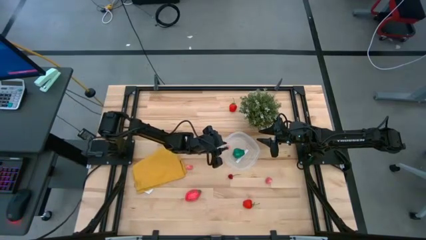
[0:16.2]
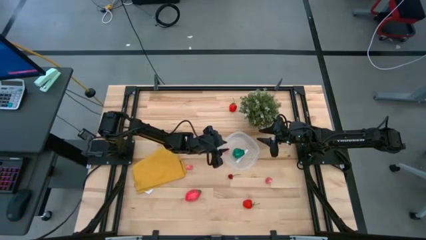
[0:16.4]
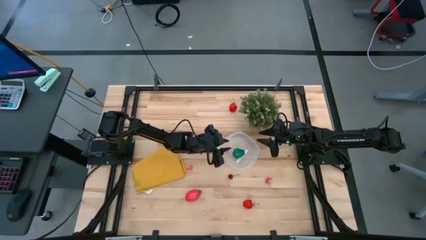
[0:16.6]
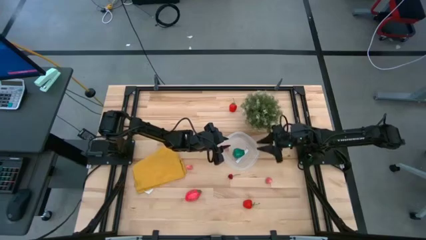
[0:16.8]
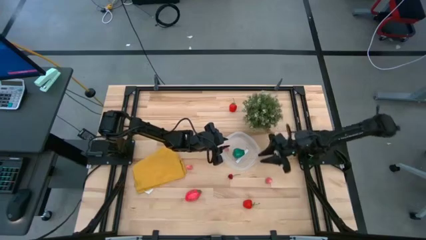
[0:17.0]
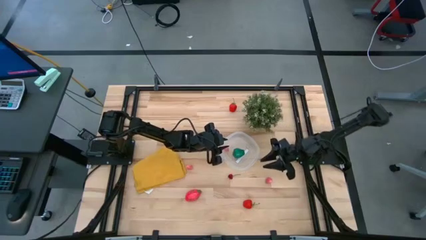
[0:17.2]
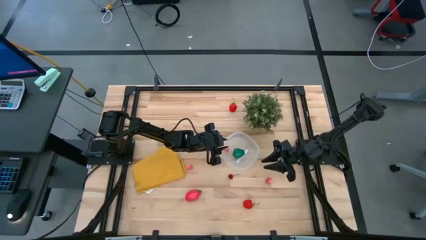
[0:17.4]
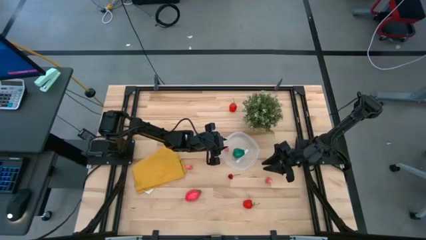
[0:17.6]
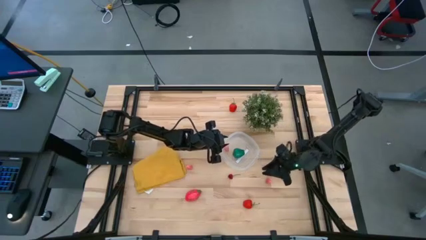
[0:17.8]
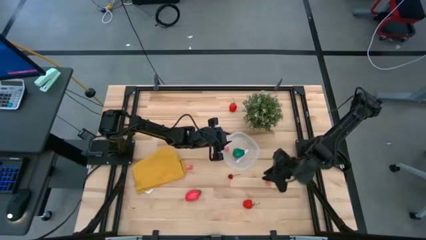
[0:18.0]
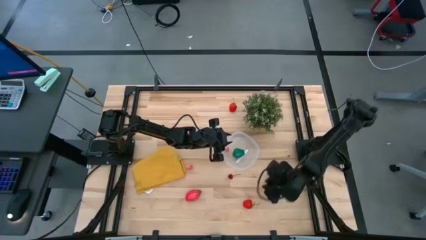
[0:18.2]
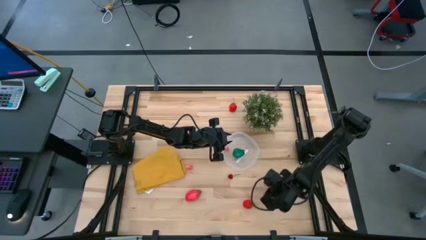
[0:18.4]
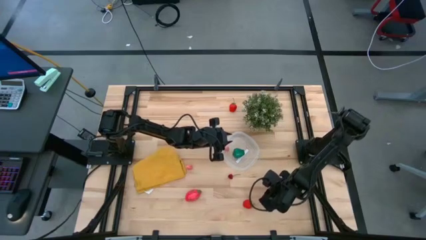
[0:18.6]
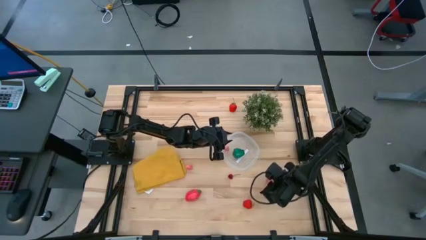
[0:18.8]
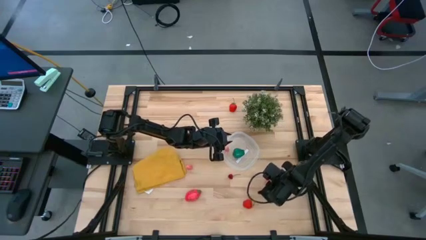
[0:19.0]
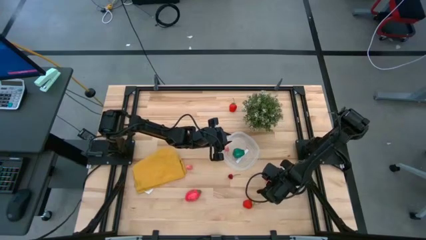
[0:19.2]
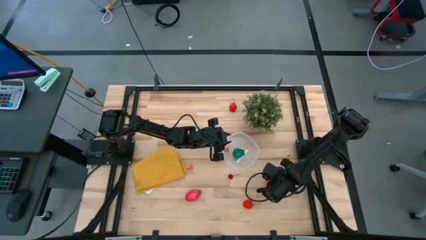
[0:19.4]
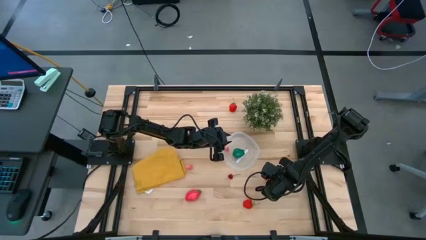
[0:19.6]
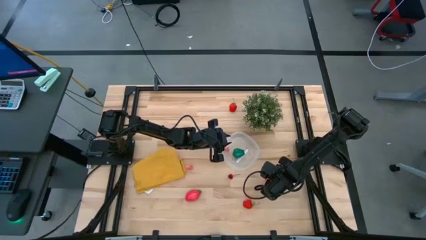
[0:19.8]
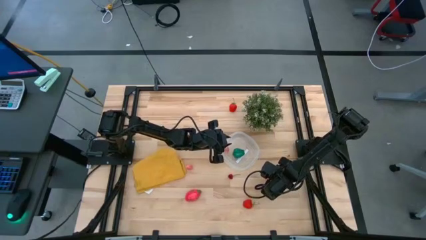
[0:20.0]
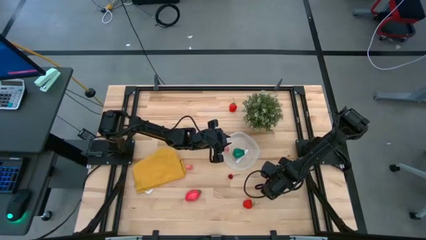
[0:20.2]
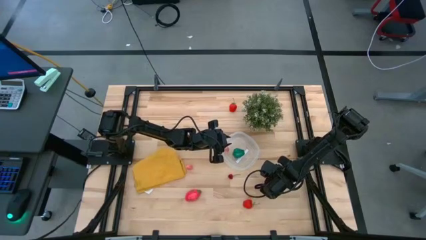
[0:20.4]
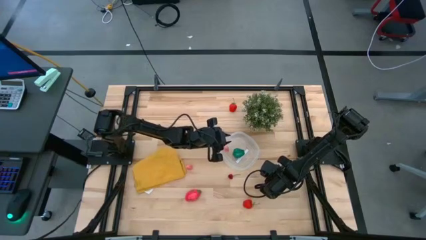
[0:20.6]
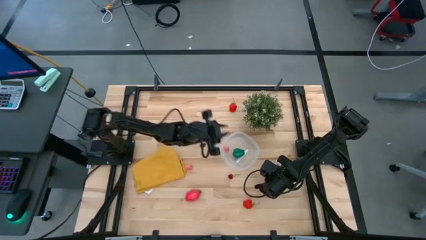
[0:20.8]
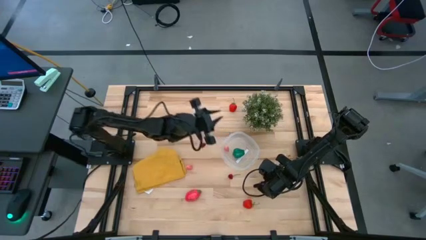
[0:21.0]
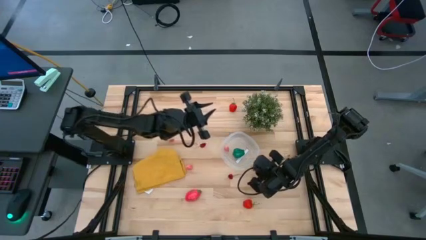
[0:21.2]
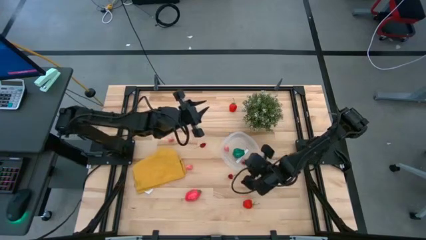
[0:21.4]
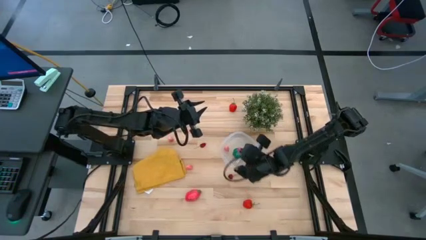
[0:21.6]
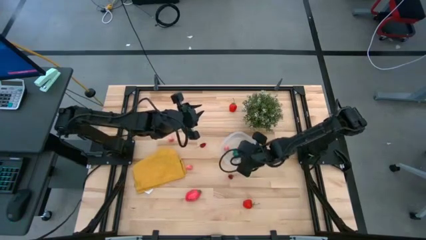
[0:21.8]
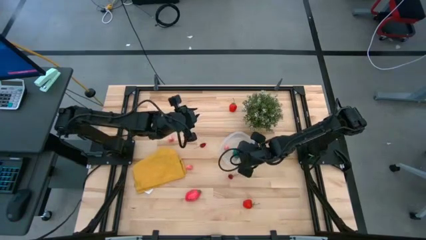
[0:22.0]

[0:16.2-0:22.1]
Task: Pick and placing Produce into tupperware
Put the peach into the transparent bin

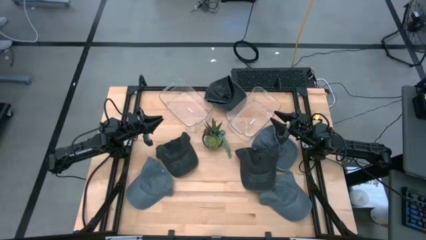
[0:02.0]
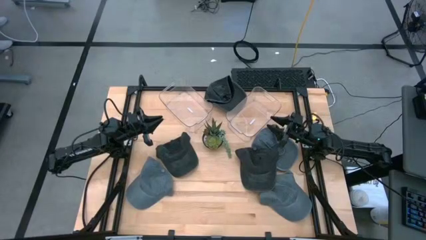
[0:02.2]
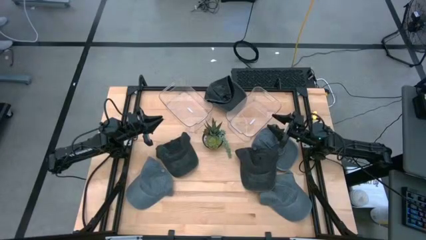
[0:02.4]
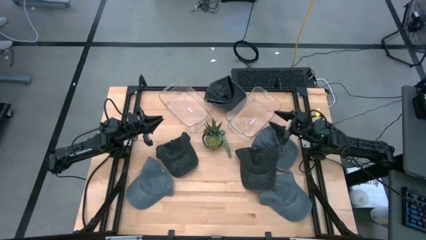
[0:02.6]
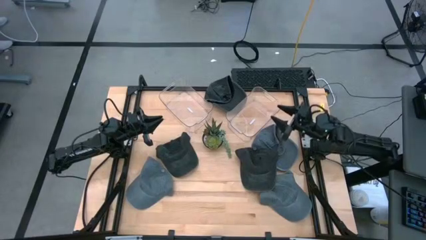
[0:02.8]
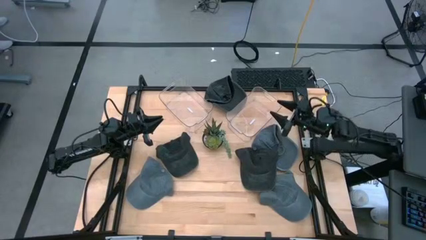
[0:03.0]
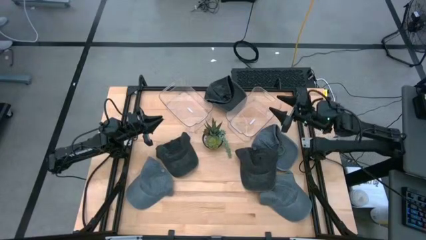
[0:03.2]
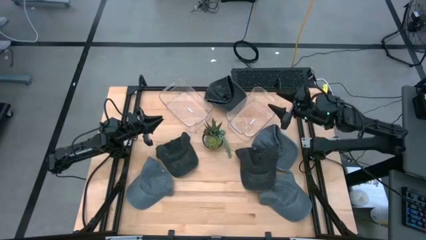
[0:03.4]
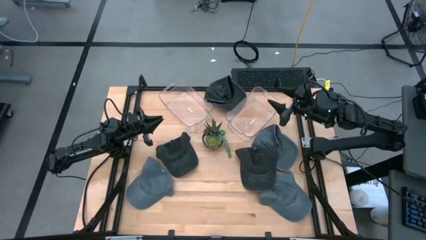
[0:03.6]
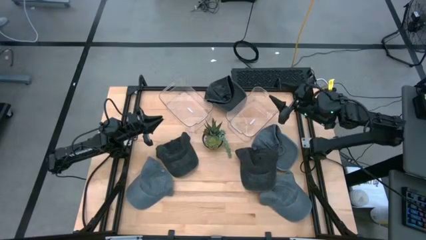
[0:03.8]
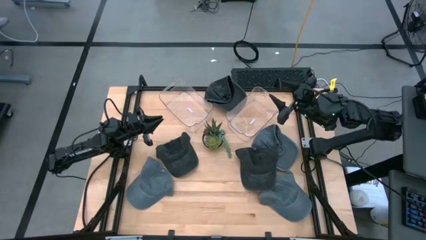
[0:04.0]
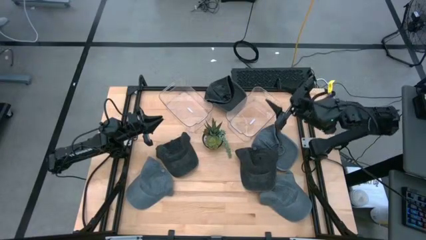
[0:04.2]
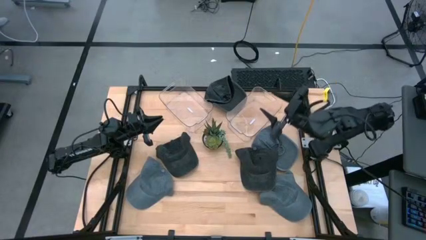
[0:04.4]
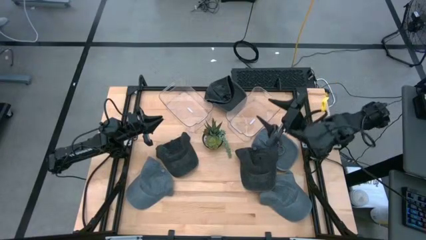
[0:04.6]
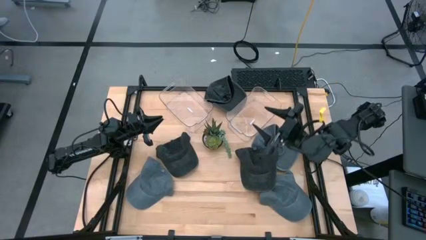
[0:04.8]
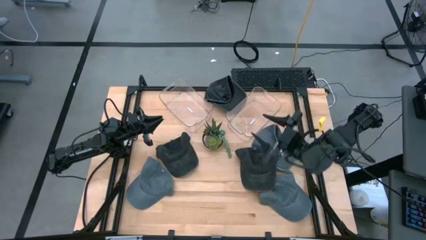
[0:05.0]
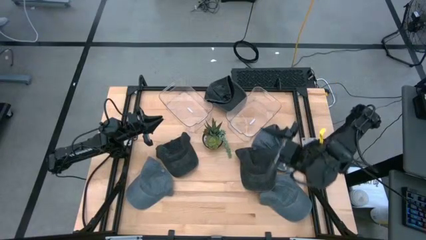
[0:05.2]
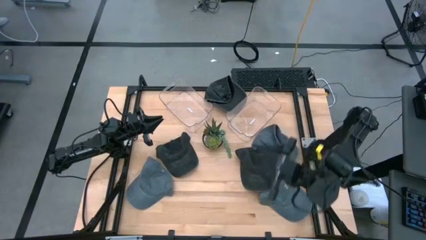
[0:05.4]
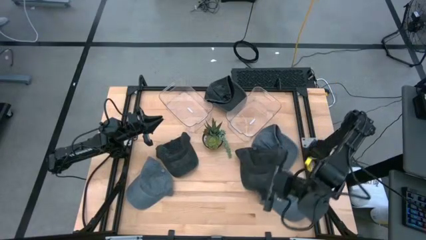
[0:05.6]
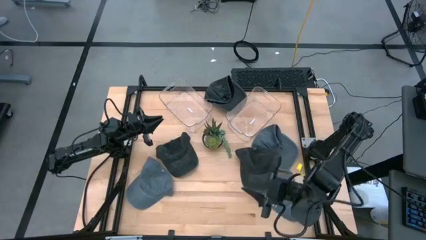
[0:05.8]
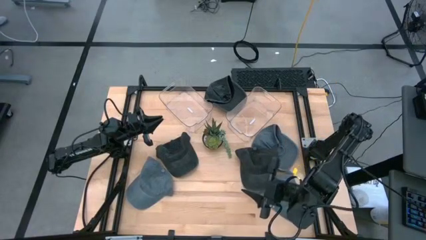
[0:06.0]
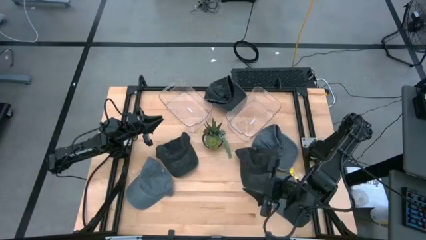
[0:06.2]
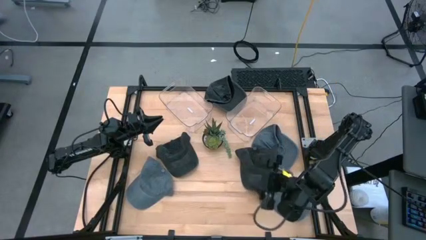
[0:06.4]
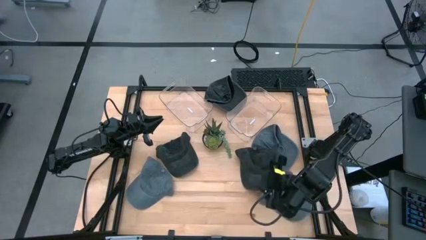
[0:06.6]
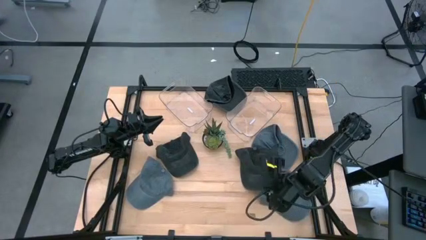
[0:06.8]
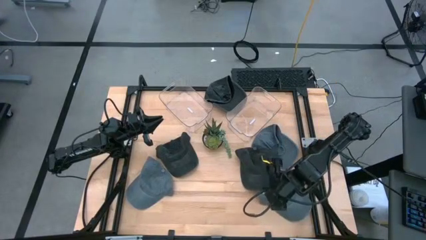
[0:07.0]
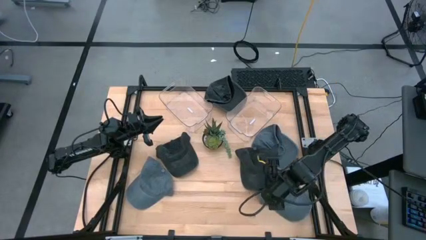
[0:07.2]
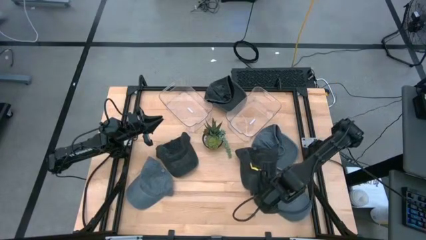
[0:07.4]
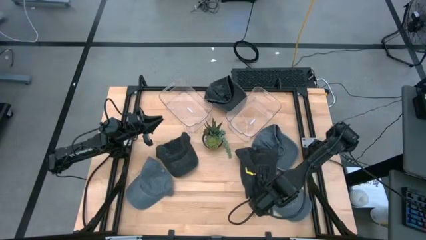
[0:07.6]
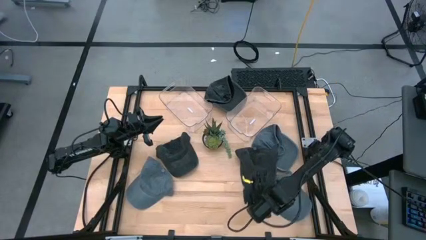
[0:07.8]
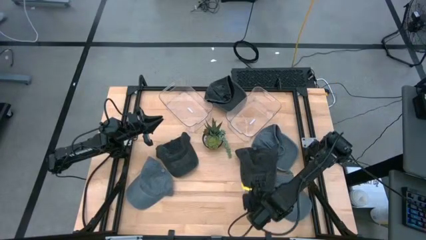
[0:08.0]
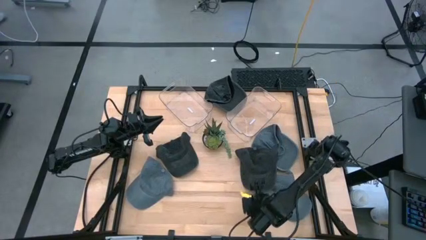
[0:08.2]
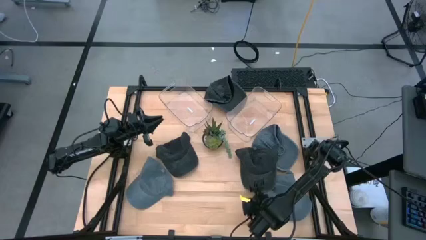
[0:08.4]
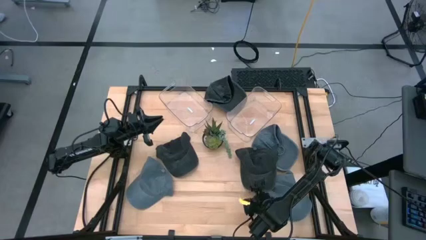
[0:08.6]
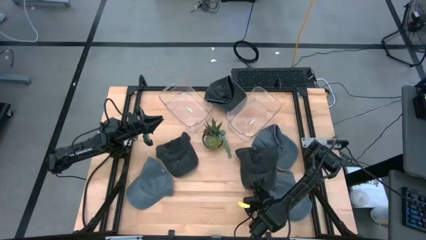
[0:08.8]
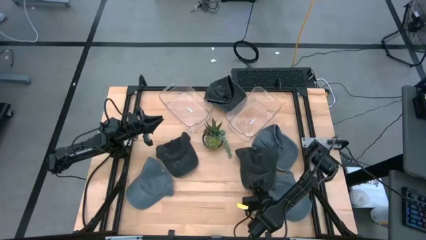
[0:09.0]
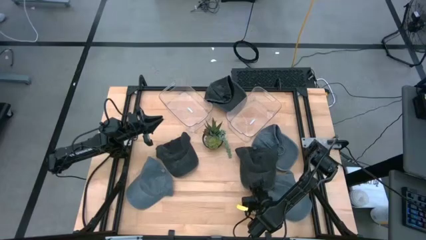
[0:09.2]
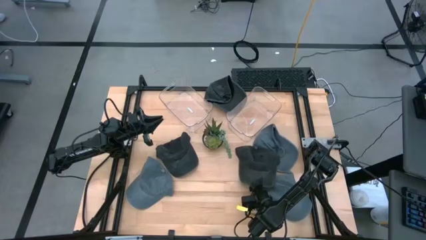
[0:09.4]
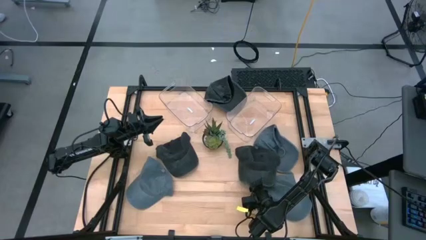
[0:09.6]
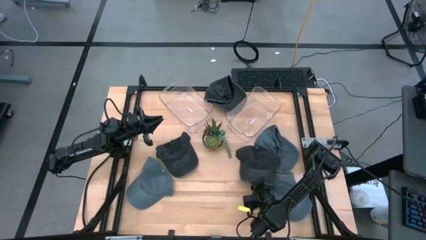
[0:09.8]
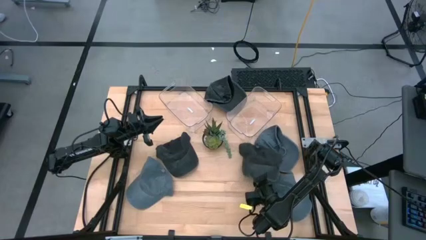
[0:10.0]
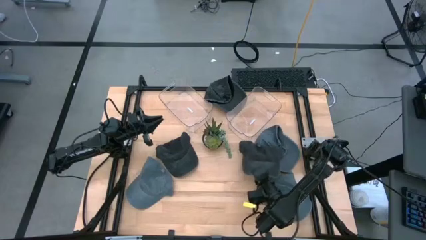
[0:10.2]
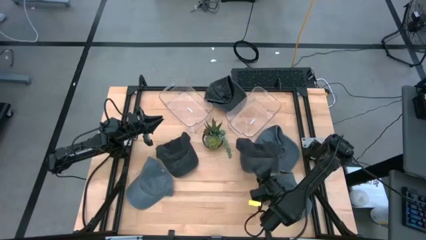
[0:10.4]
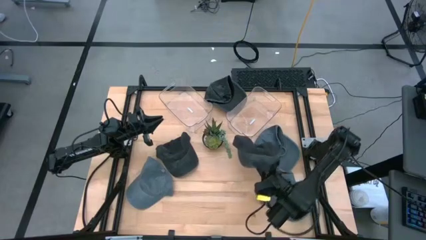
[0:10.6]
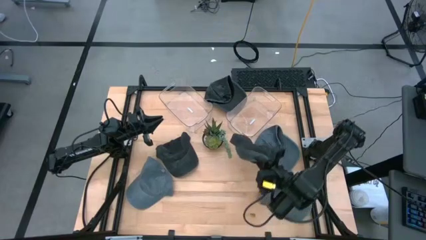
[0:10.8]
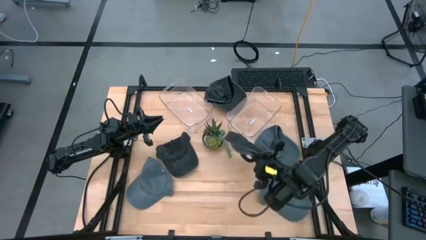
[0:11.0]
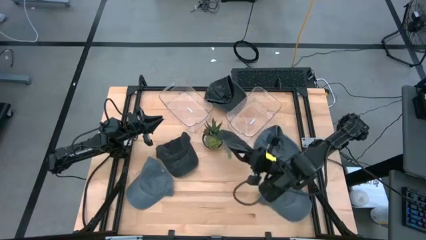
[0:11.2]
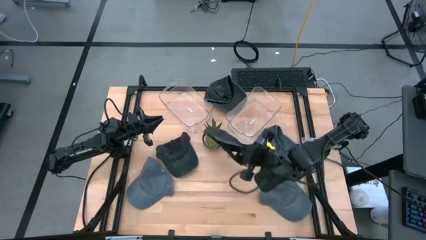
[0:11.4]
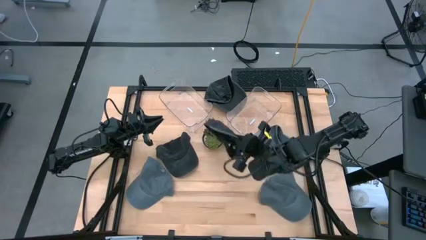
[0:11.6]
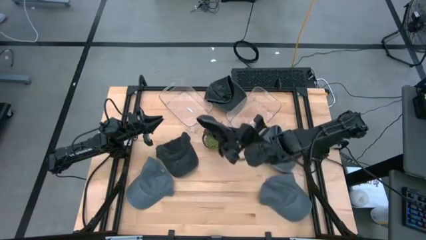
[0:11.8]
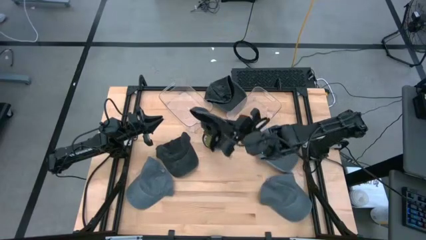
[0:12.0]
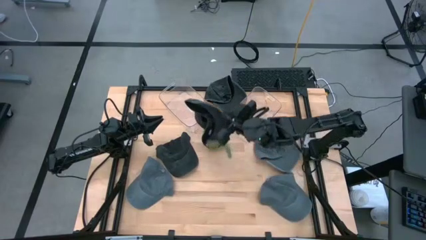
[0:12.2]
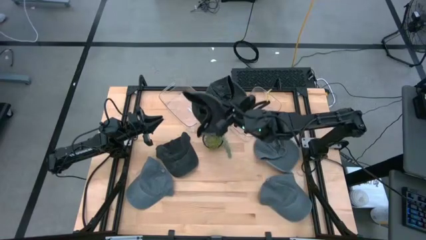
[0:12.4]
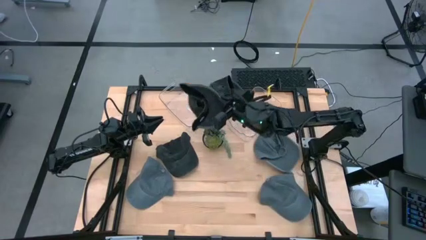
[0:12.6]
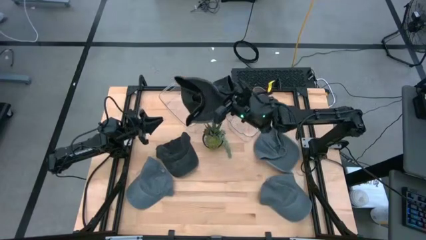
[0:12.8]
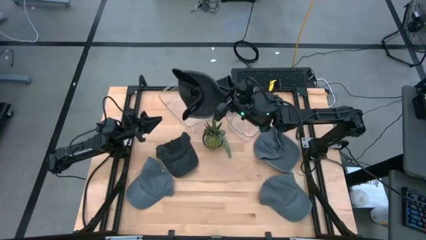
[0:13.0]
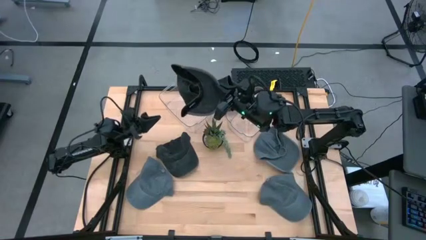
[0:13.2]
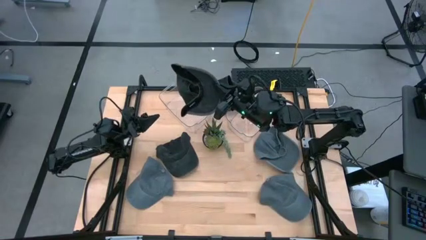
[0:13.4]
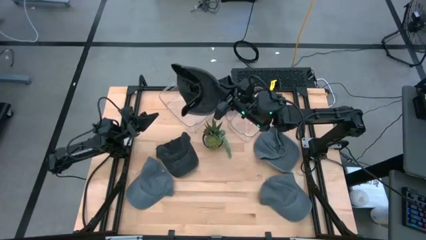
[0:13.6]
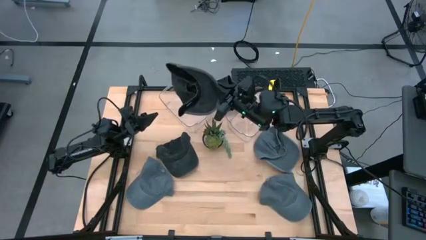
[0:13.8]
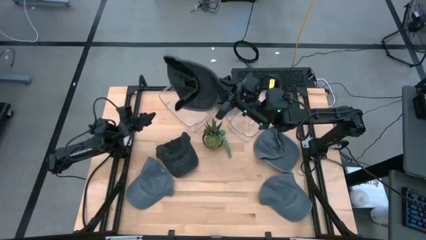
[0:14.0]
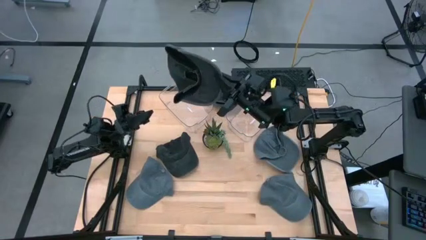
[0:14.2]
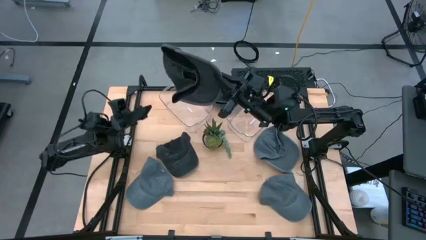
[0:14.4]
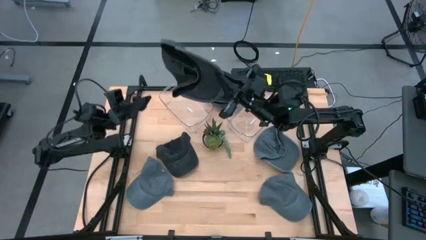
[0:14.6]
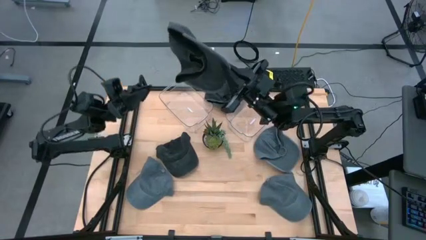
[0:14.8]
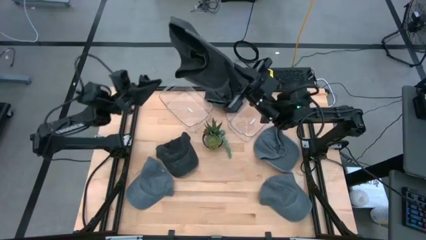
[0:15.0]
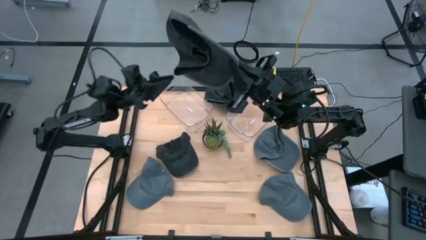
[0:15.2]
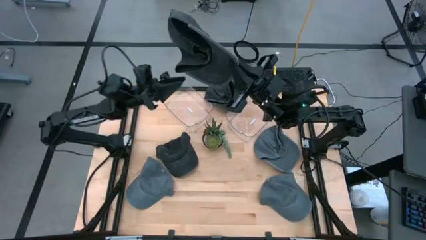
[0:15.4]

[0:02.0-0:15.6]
Task: Pick & Place hat
Put the bottom right black cap into the left transparent bin
